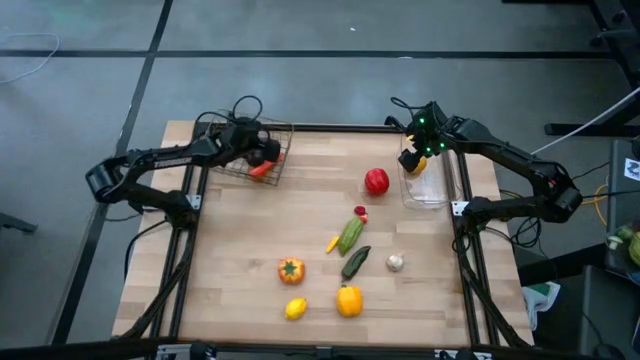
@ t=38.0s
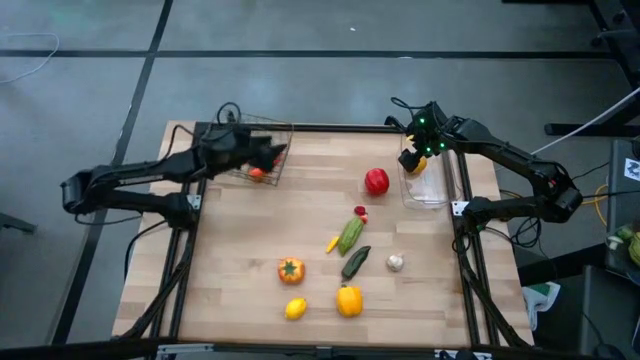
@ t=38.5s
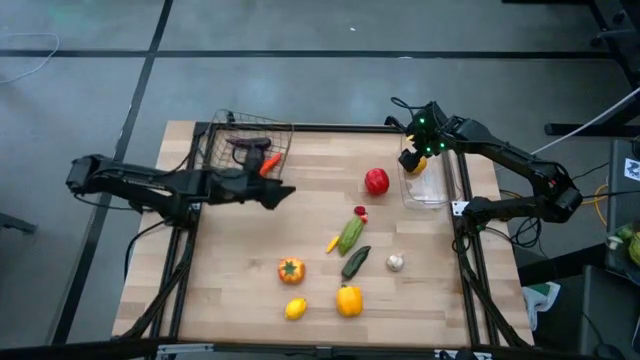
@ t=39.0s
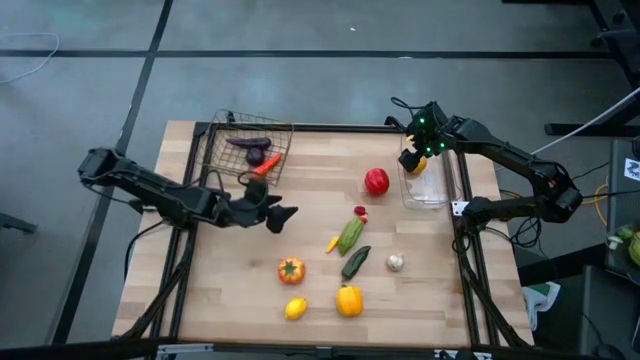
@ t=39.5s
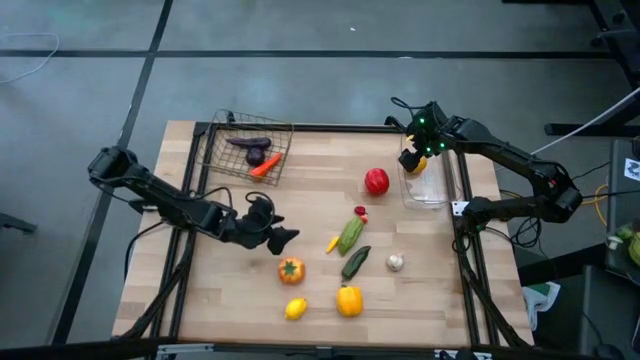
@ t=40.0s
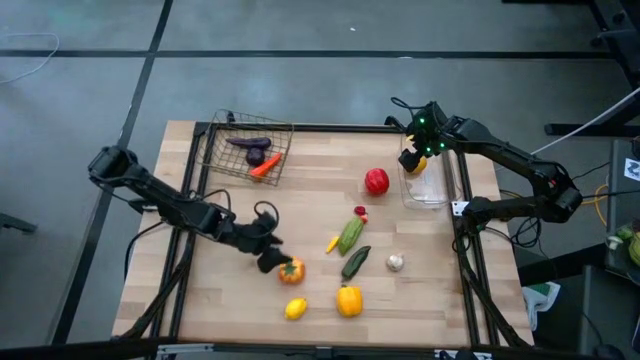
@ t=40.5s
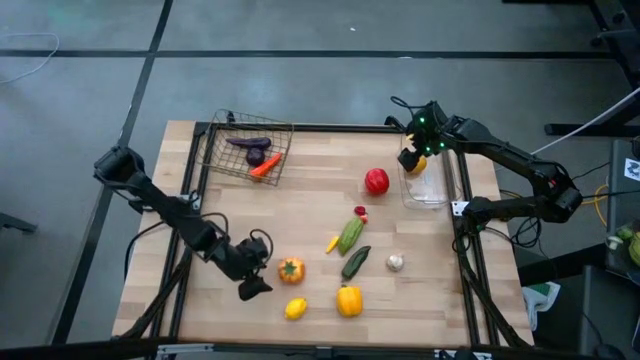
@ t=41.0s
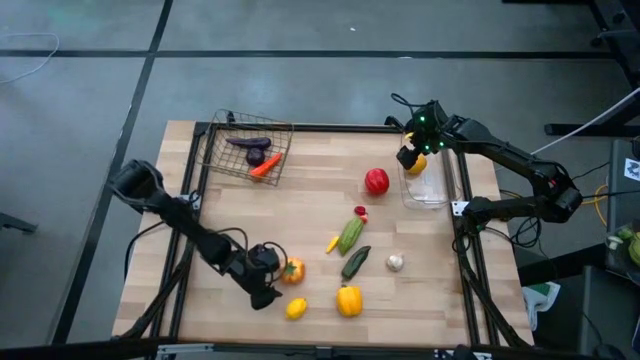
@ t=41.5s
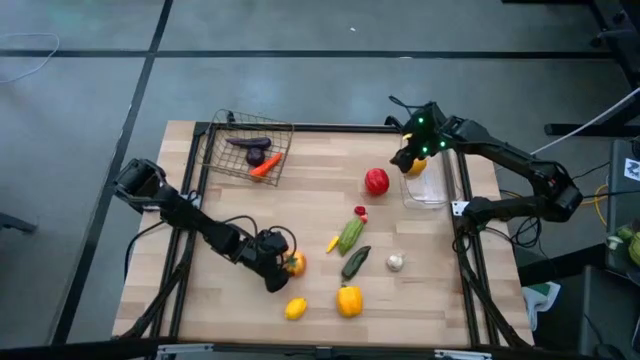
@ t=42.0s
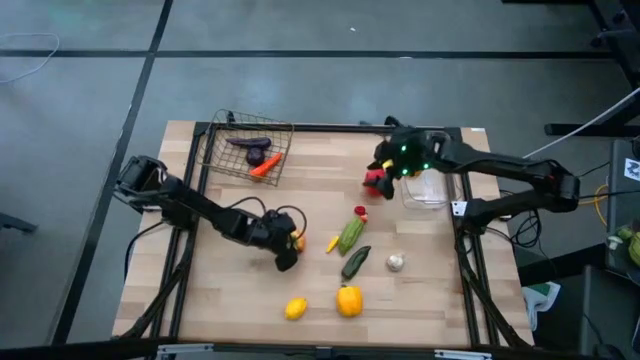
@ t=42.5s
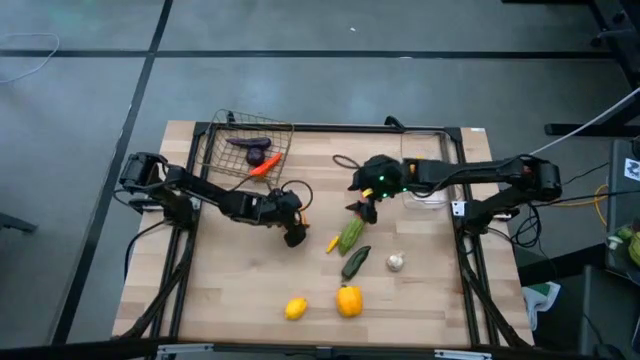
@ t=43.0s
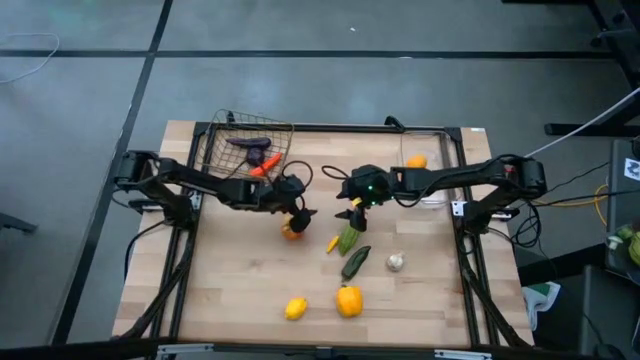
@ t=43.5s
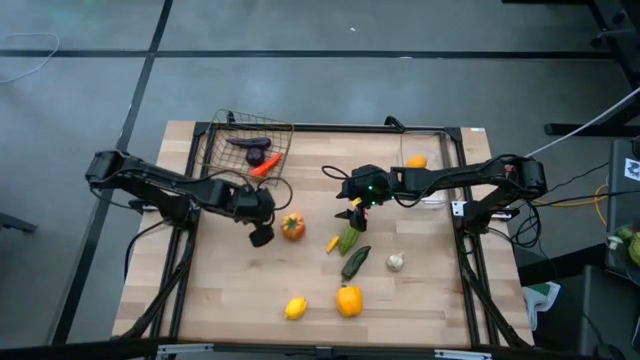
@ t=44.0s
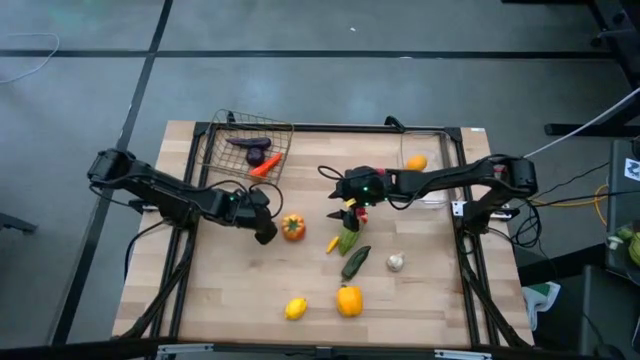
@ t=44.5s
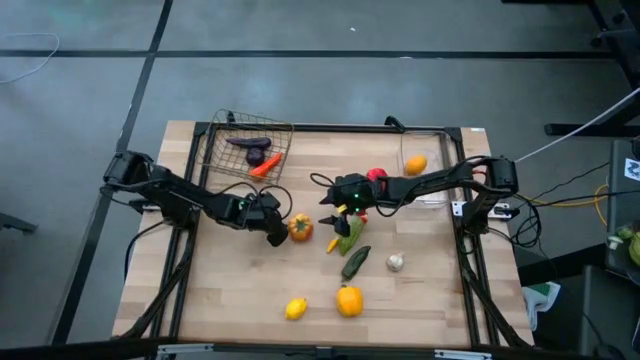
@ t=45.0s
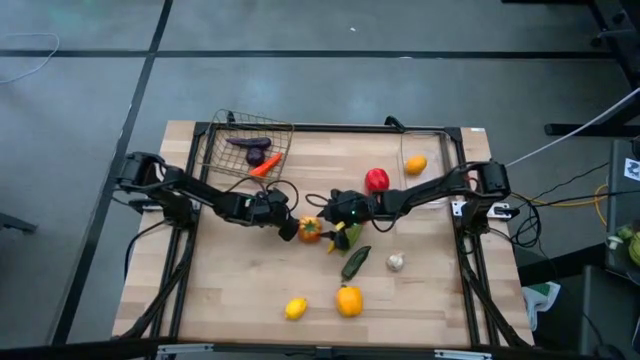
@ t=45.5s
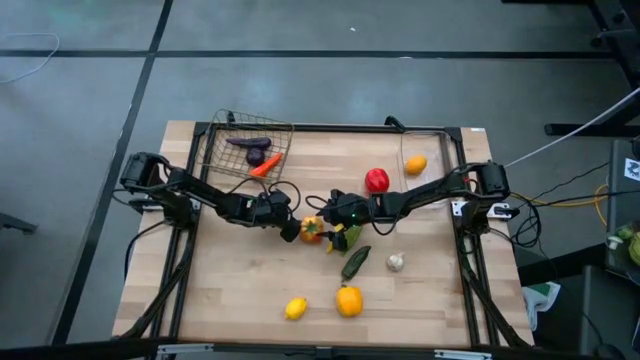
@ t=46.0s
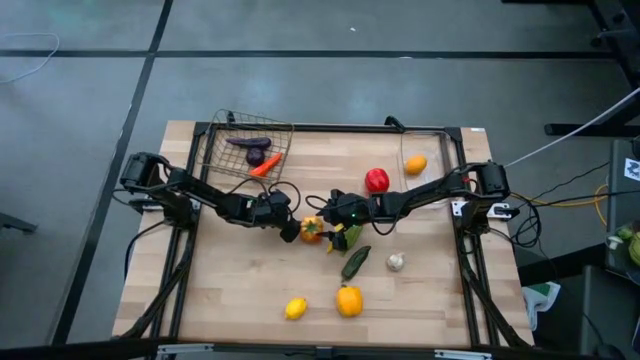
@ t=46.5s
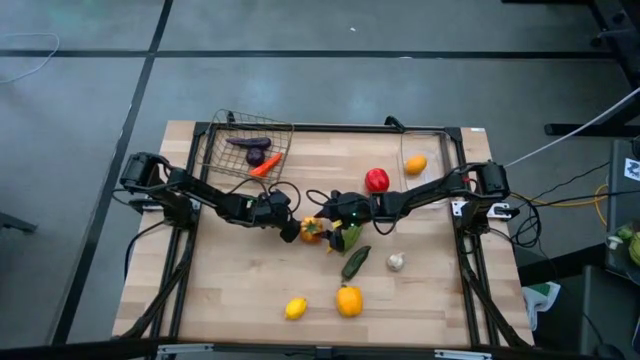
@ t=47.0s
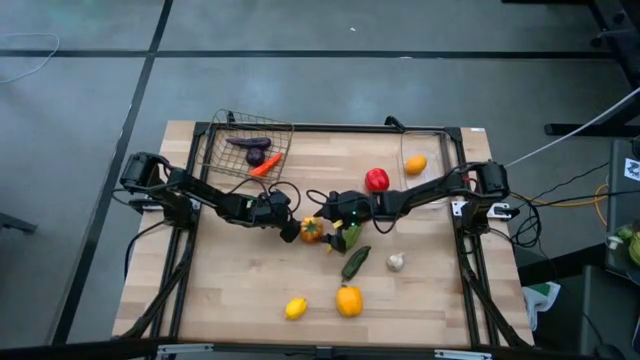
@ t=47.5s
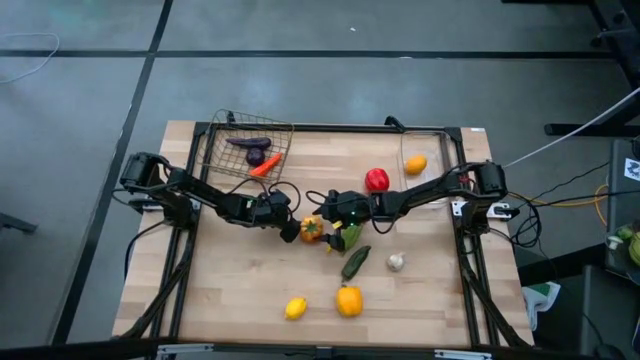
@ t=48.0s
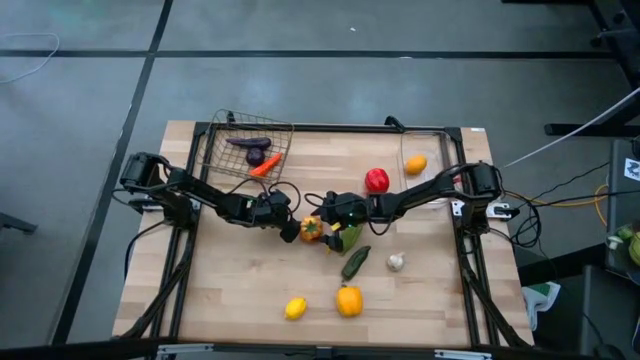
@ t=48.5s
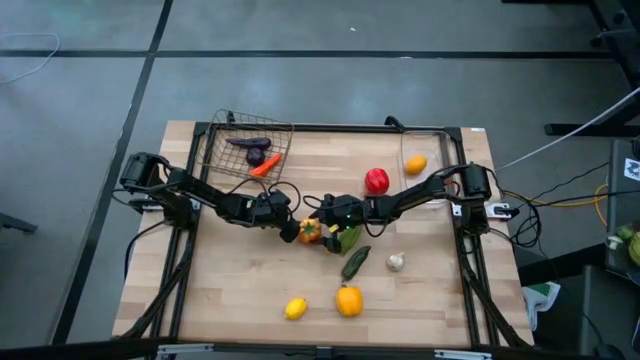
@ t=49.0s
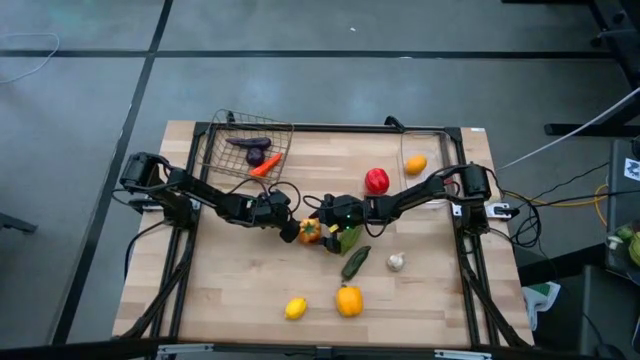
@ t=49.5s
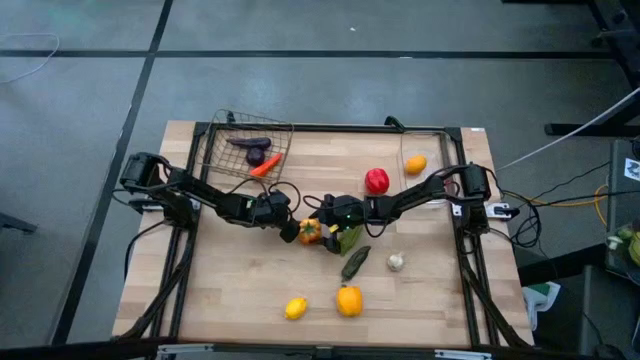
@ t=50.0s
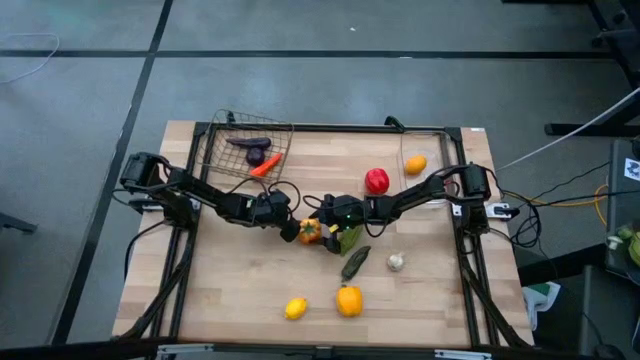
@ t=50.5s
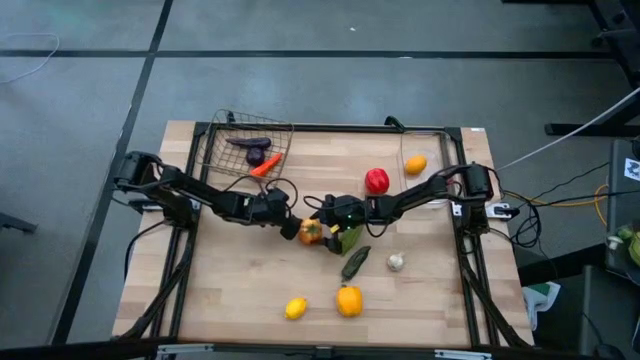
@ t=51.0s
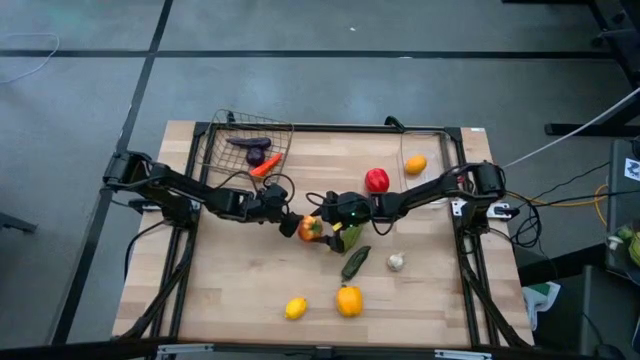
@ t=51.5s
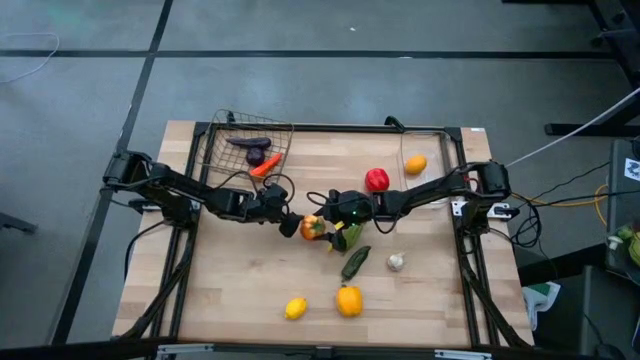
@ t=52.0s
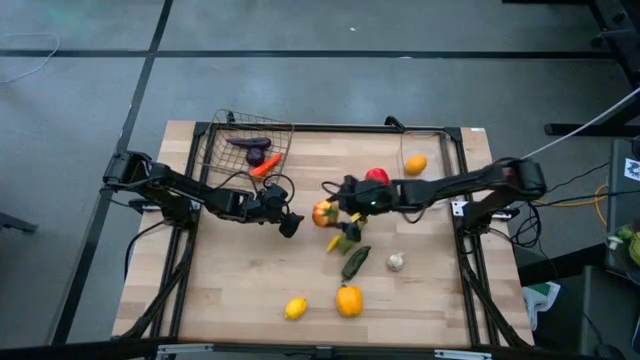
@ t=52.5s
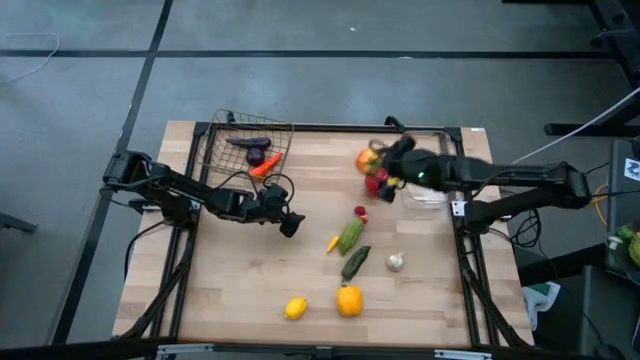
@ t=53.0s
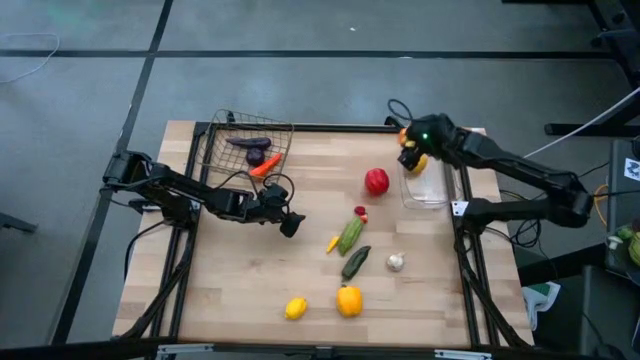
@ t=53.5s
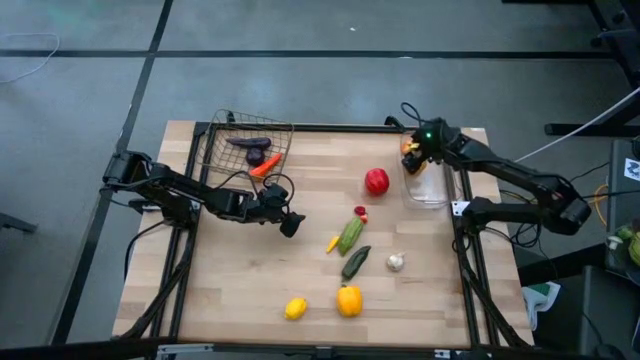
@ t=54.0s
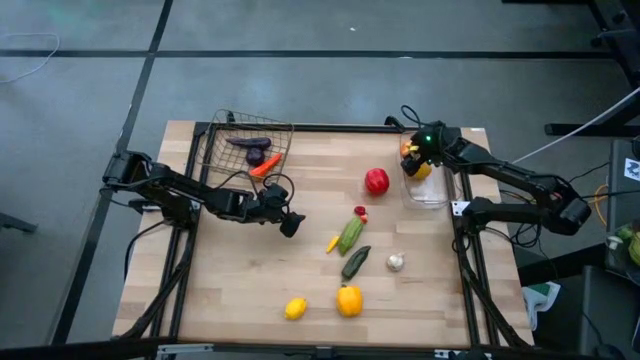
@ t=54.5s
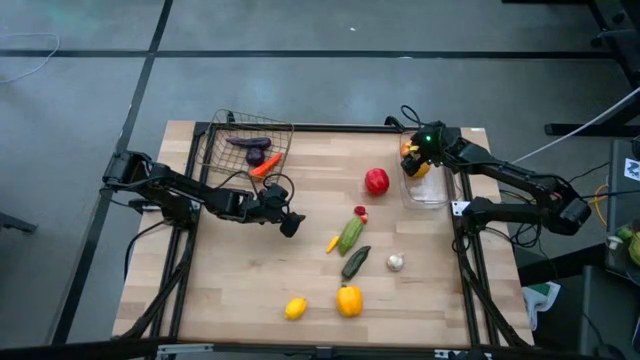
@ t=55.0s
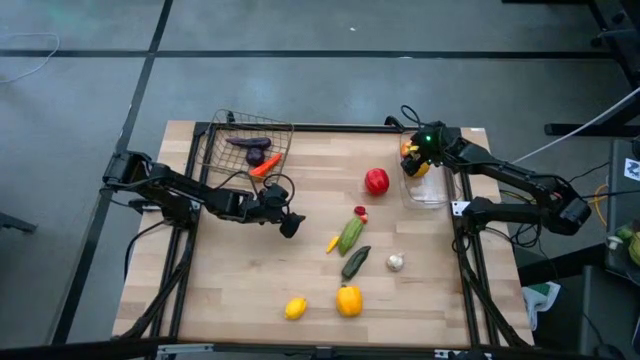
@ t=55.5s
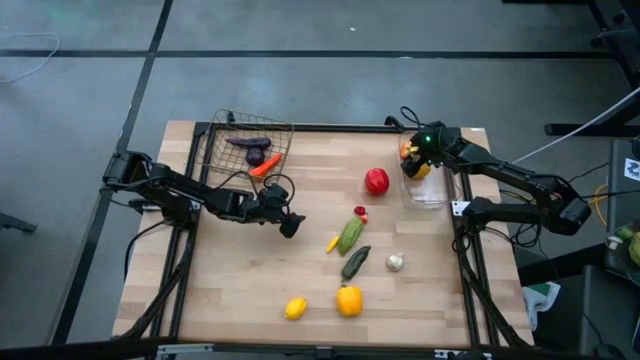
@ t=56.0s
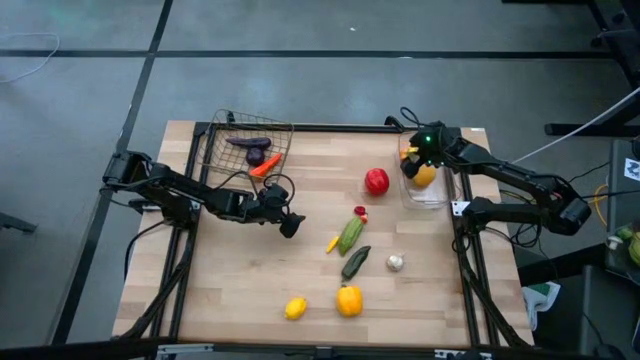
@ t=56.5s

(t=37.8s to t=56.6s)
Task: Sort produce into baskets
Put the orange tomato into the transparent bin

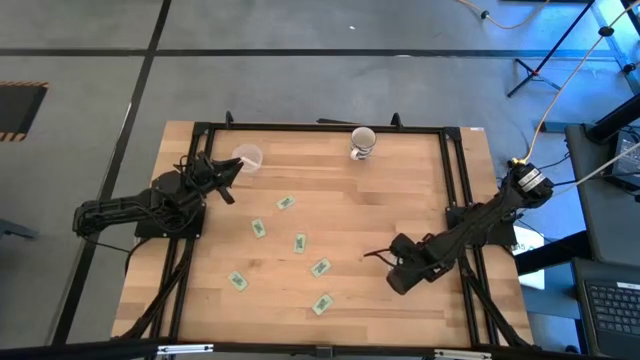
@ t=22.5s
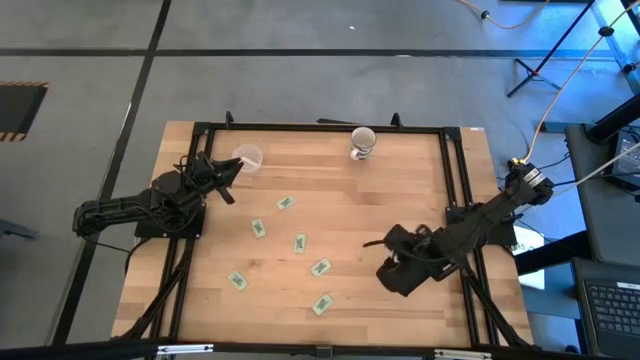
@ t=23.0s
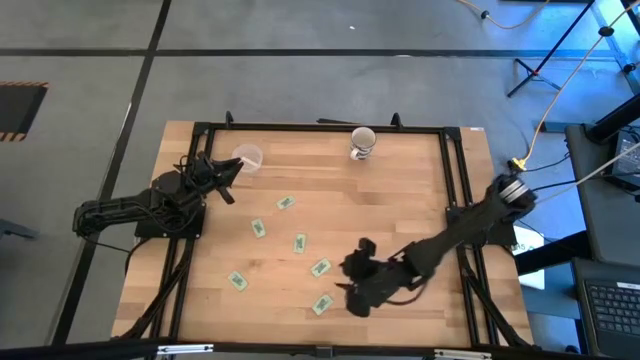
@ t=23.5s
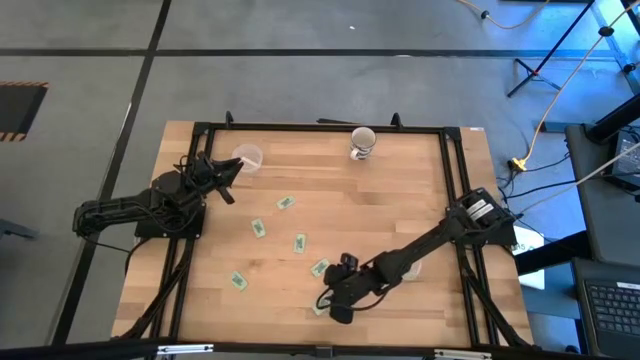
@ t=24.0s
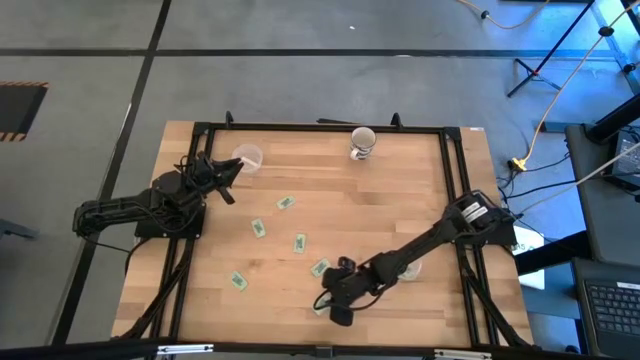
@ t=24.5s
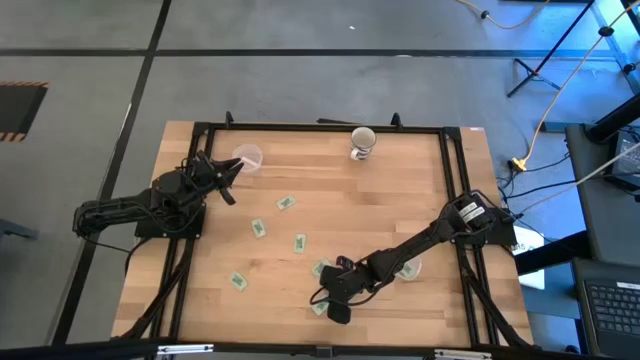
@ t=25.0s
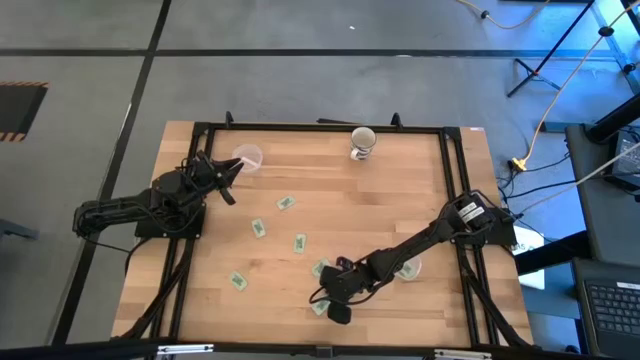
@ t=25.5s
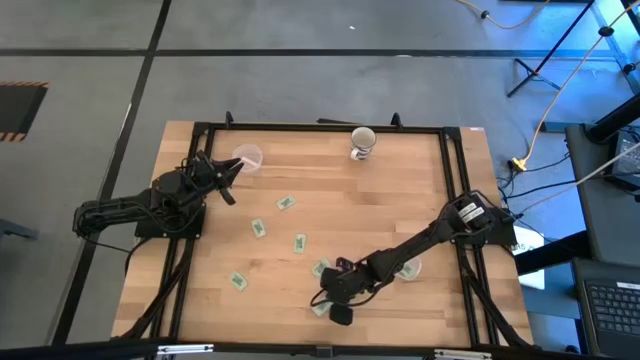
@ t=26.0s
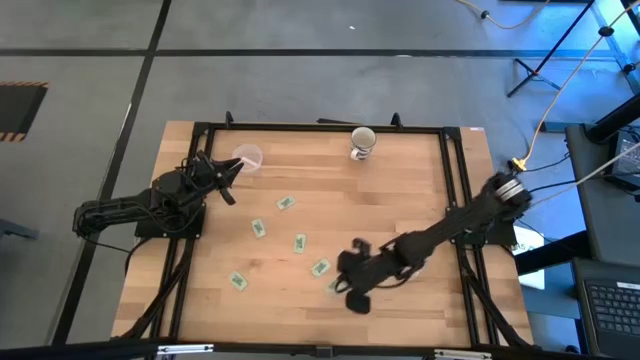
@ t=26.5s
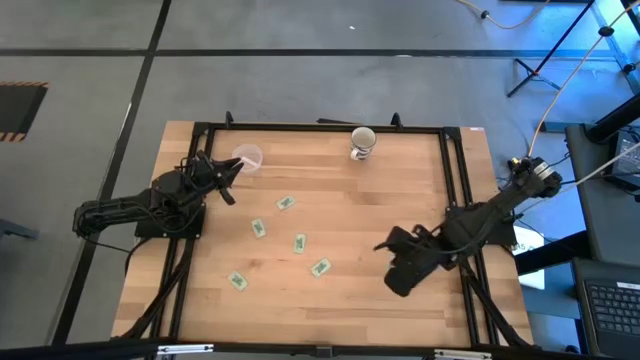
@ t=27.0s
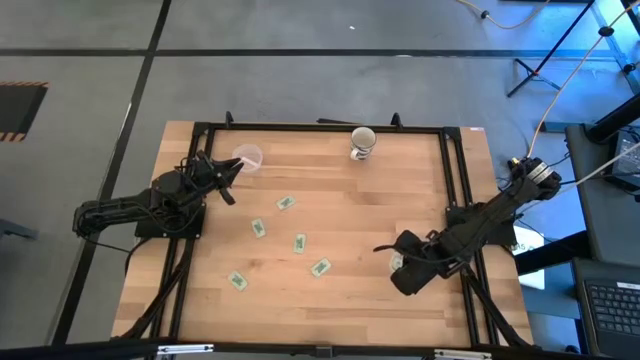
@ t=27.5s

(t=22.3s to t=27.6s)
Task: Pick and place items into bin
Put the white stevia packet into the bottom transparent bin
